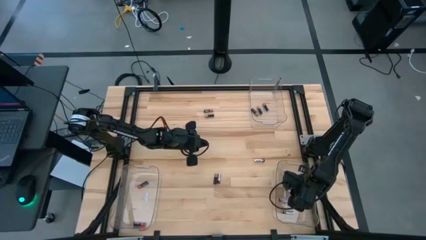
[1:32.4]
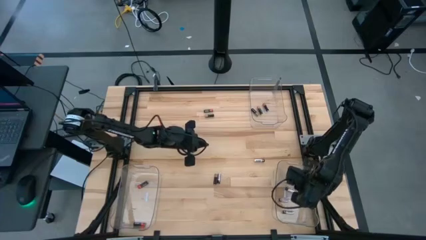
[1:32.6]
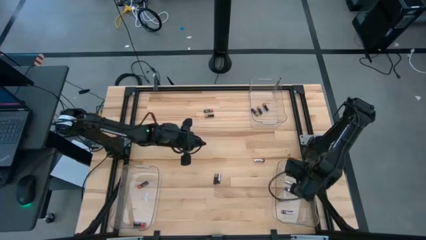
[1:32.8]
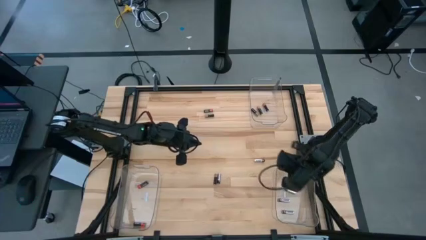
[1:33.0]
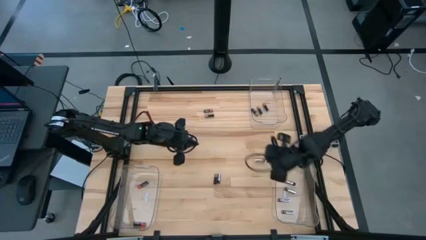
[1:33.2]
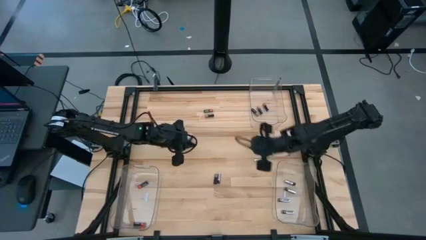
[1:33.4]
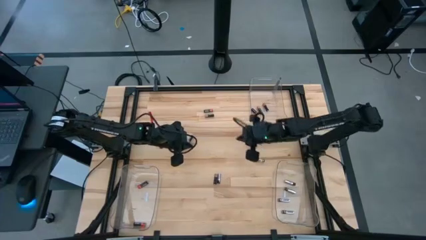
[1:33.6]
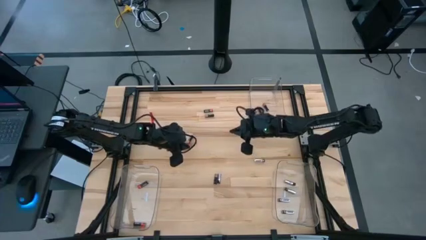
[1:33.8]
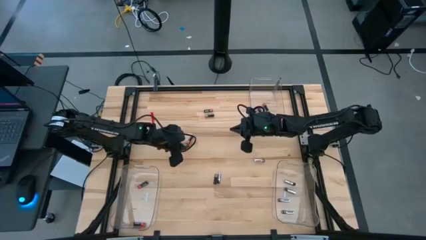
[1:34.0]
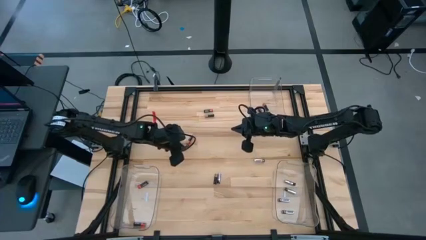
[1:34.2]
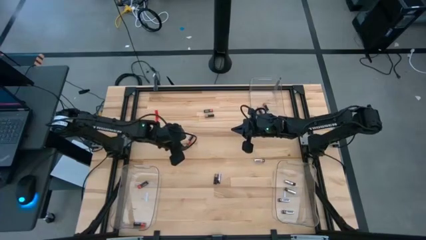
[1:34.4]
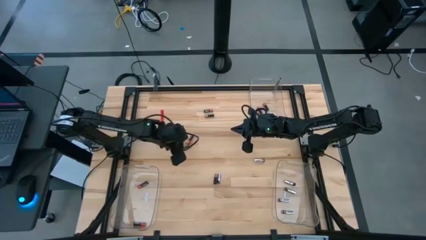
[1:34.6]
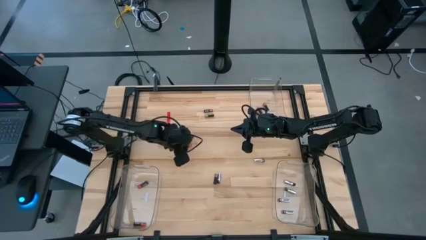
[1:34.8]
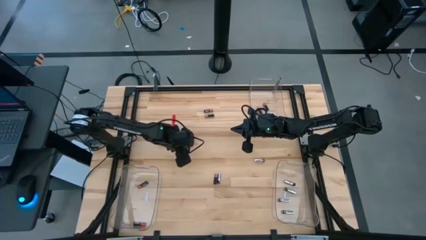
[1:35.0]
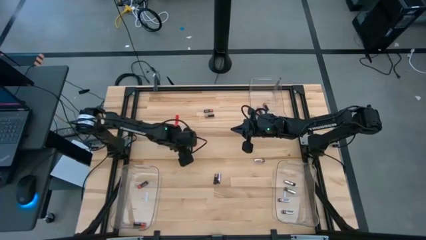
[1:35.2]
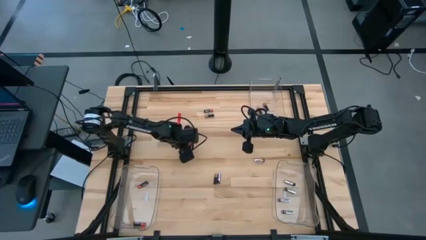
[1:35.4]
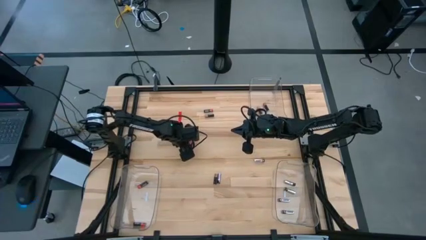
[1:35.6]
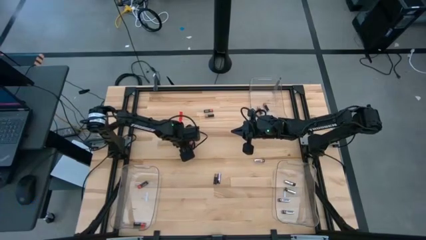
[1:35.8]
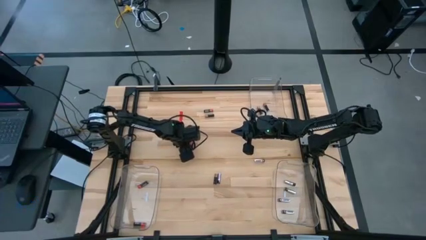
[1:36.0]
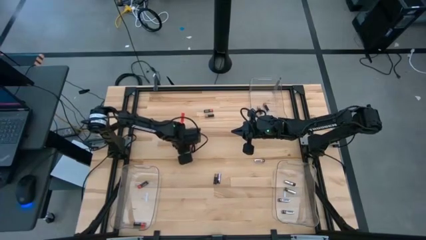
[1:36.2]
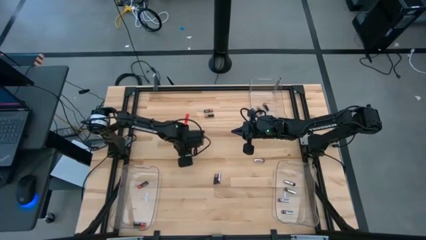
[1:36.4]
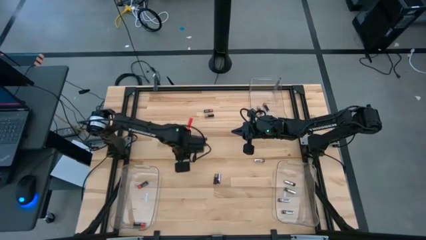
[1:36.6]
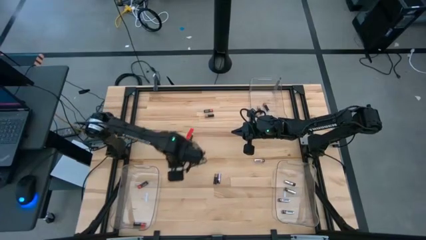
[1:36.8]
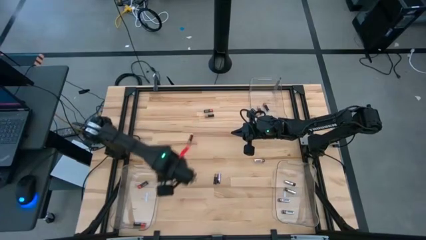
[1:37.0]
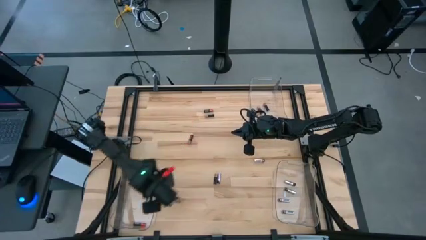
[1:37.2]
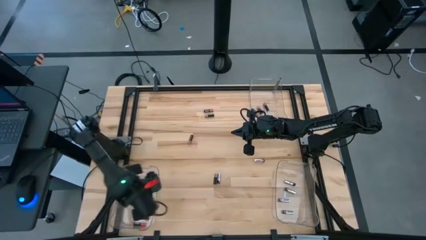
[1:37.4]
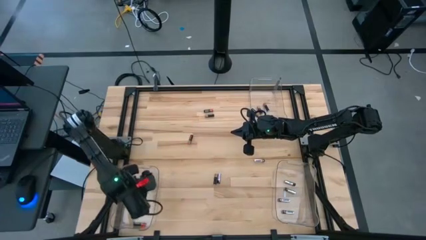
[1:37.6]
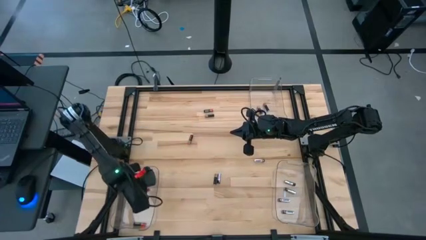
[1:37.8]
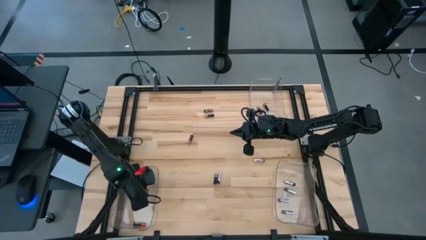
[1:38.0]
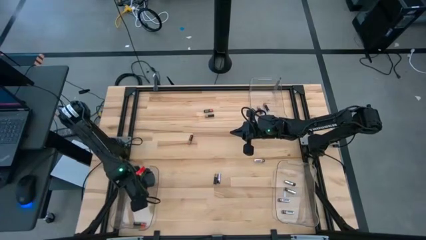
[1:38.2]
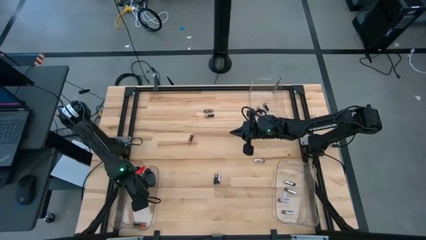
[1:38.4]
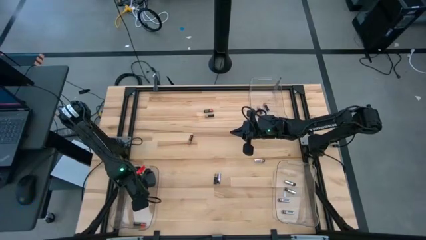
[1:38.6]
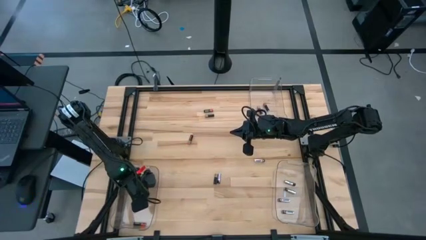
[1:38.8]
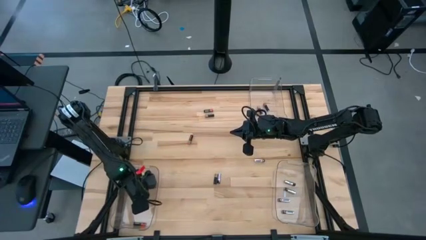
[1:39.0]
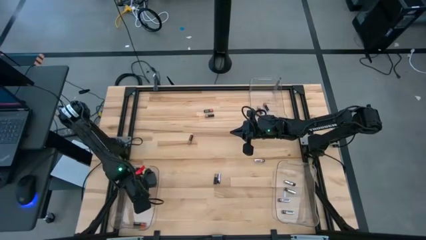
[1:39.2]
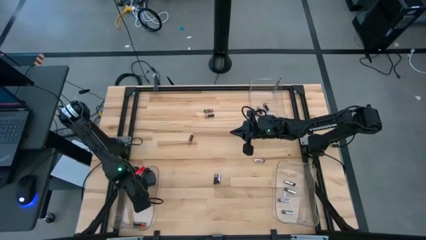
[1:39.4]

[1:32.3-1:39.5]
Task: Sort batteries
Put the orange battery into the bottom left transparent bin

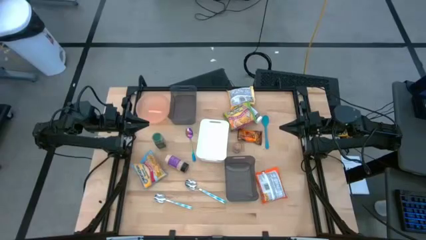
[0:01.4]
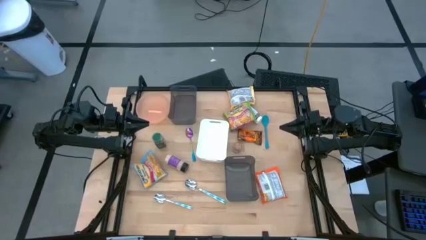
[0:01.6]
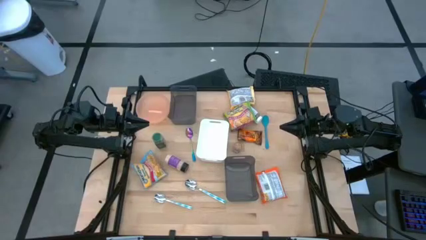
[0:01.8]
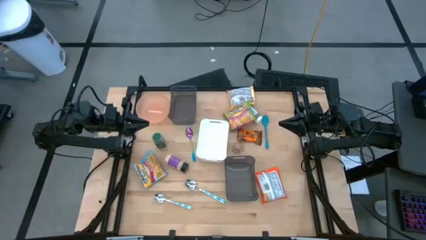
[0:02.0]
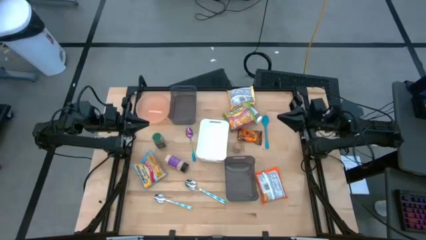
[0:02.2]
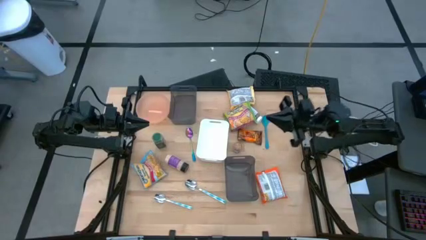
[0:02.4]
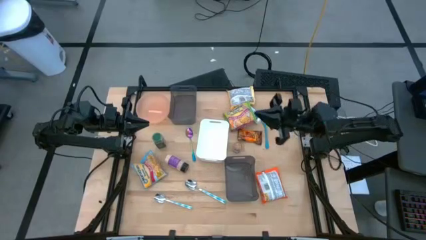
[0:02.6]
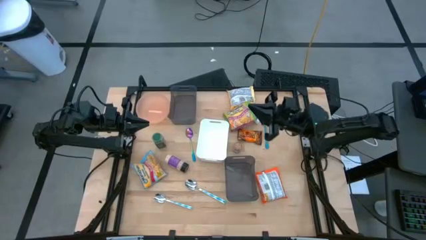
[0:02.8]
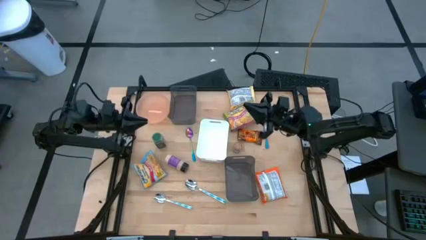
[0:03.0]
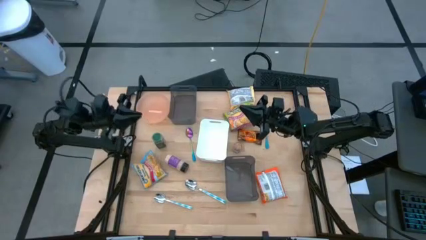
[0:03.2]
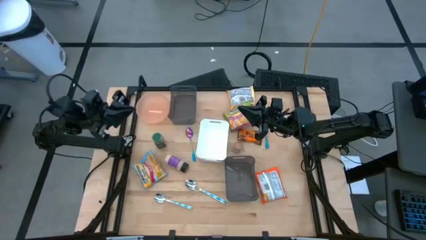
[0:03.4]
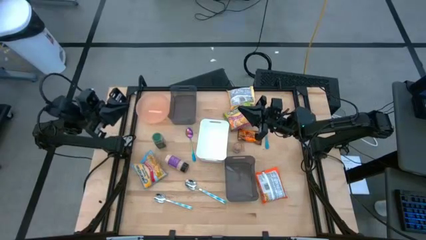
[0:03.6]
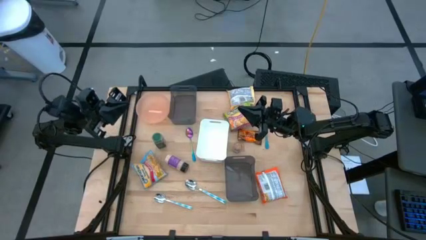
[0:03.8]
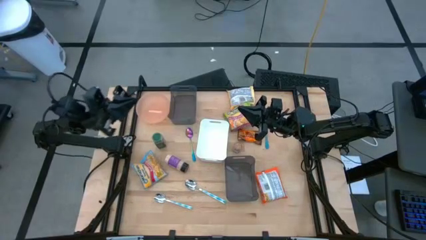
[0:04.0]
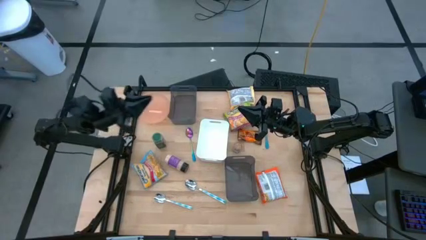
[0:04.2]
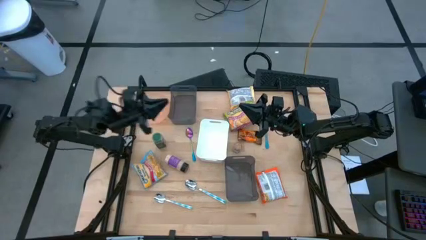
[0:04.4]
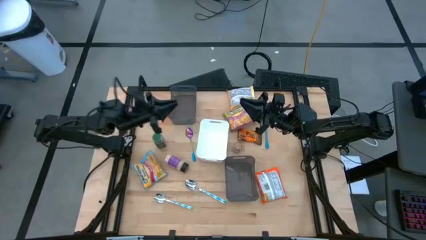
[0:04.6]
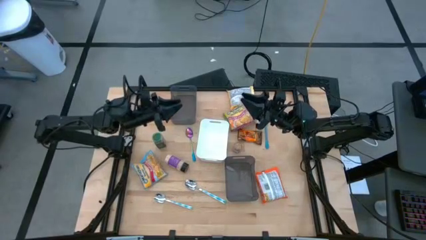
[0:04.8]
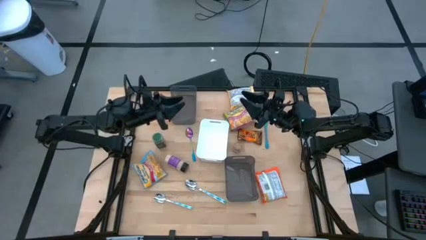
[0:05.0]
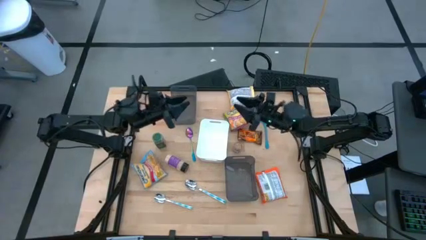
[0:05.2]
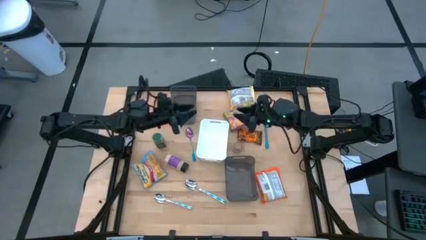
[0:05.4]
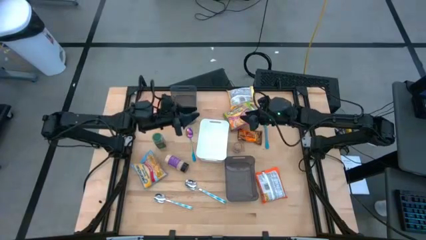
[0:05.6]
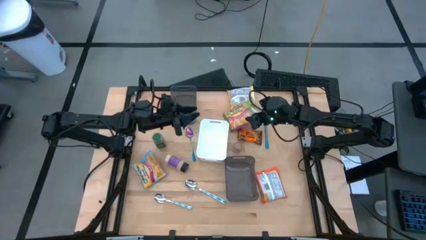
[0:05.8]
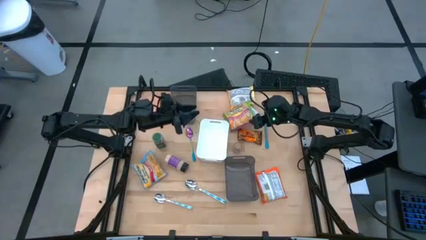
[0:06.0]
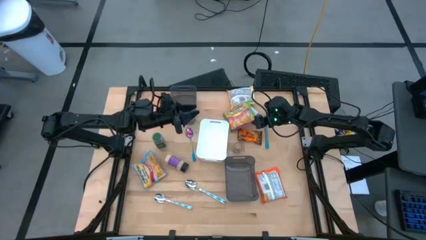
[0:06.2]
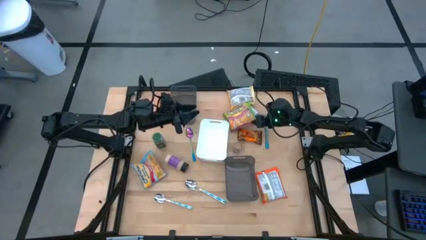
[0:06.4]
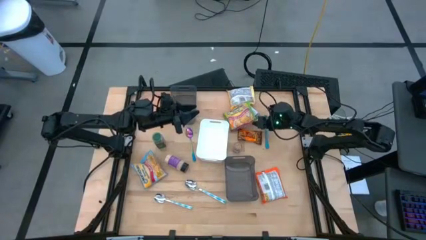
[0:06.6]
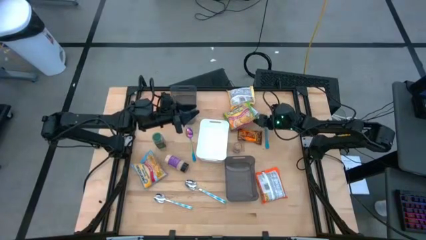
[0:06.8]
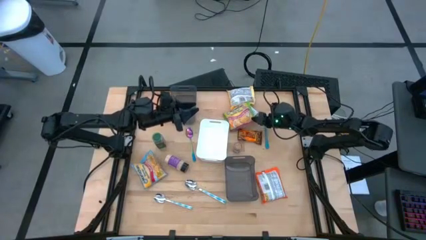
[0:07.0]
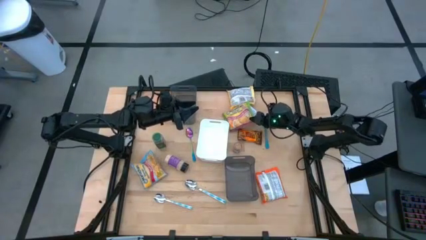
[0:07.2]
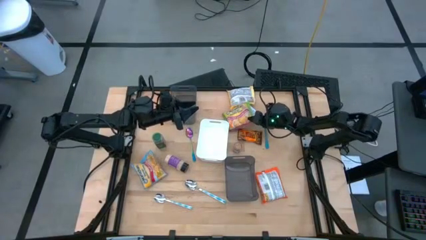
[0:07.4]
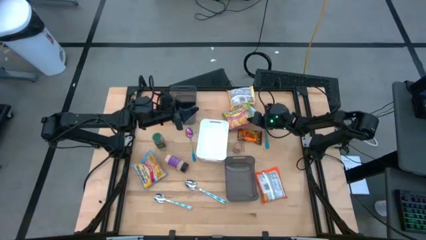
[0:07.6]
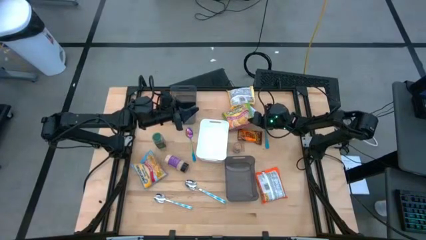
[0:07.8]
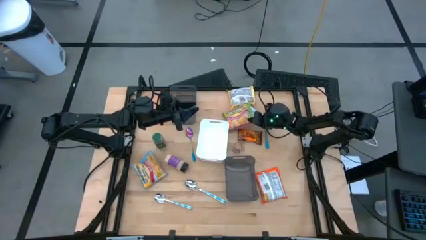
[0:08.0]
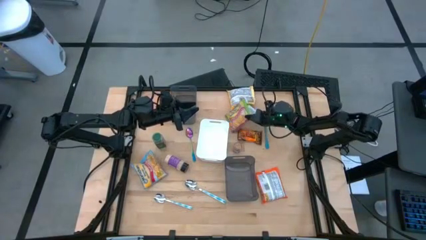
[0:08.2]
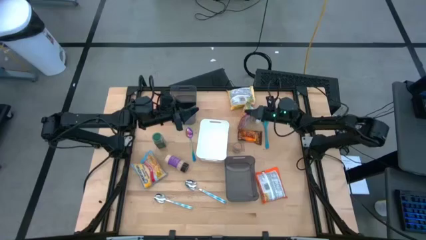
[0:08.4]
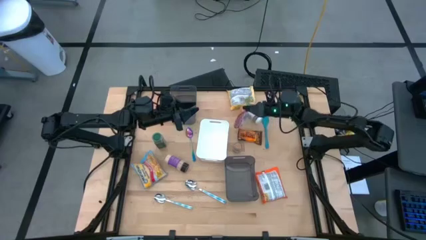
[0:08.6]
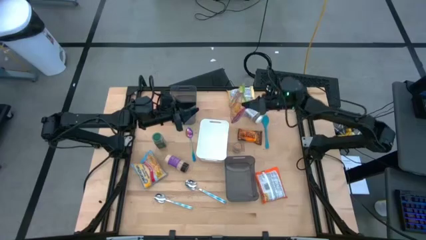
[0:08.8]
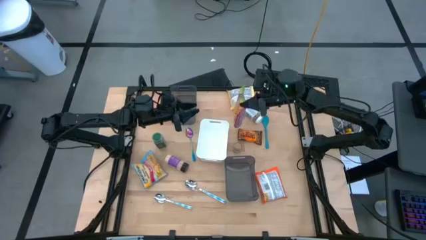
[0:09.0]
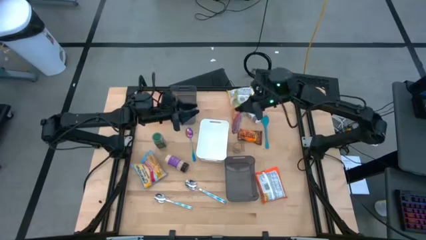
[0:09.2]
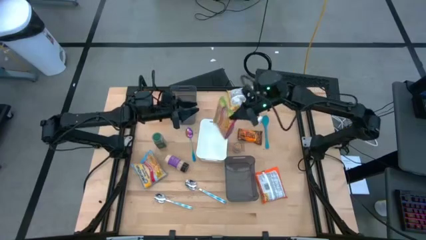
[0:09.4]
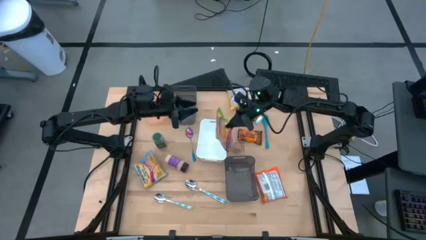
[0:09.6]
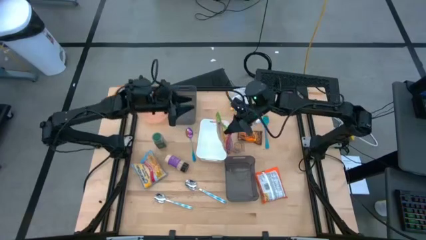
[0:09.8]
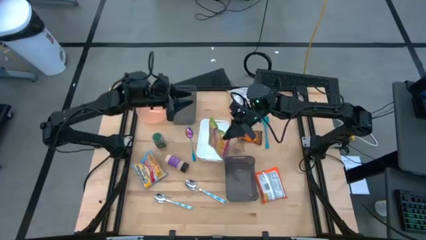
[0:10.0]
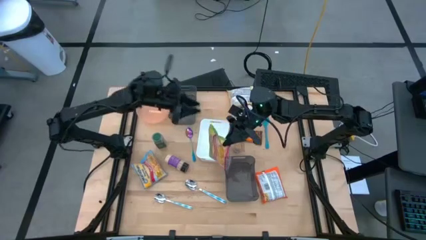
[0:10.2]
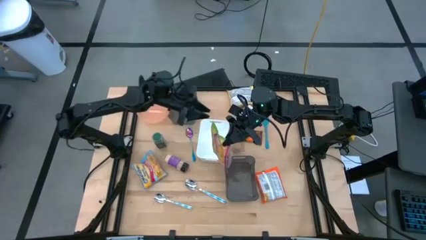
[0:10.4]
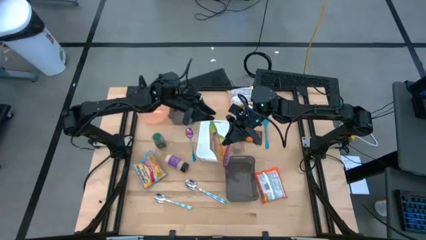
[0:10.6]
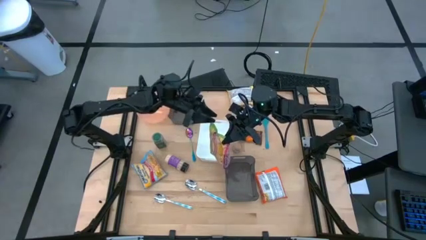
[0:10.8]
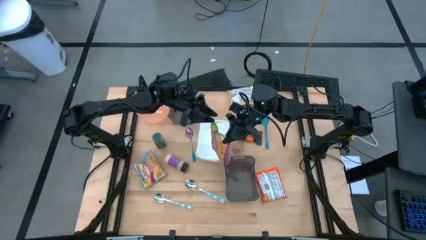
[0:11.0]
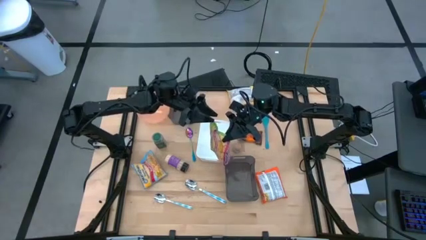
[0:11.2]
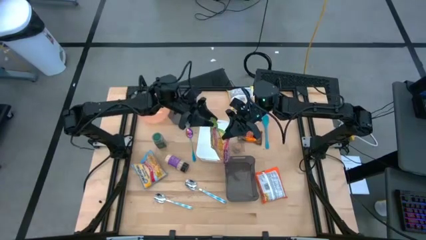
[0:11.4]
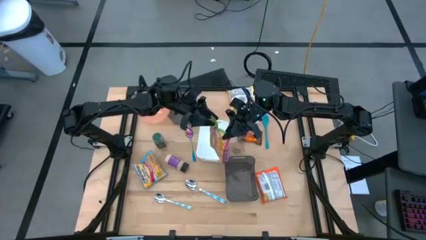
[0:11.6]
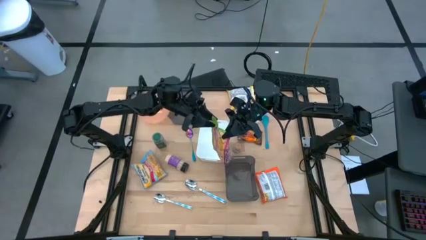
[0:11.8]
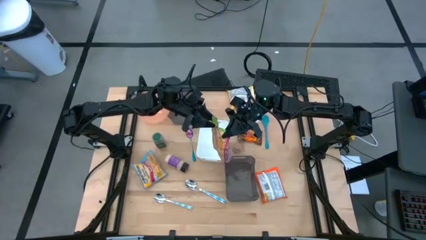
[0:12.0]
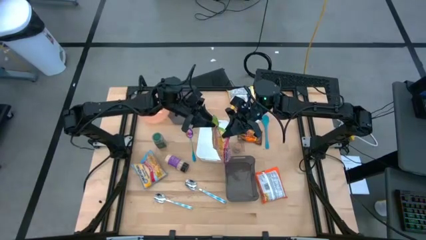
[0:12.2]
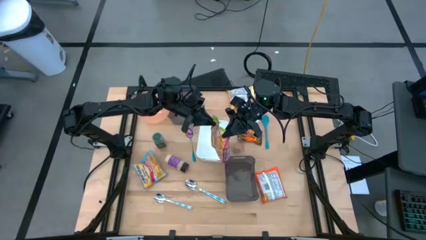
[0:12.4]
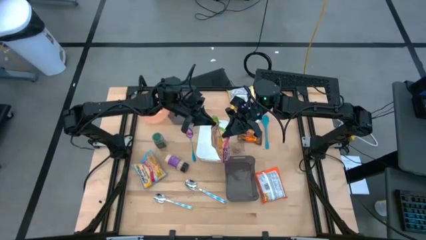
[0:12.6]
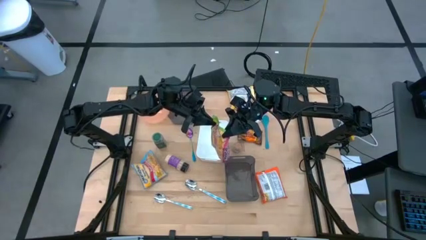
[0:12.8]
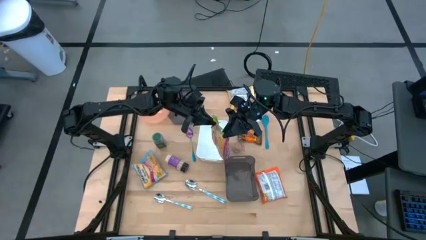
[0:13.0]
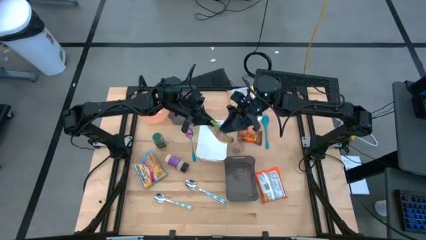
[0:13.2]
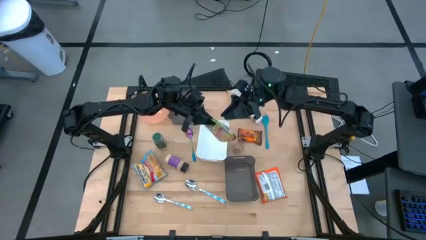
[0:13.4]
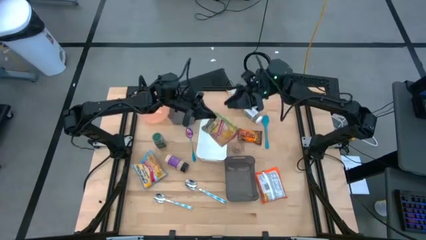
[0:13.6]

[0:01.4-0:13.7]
Task: Pick & Place Food Item
Put the green noodle pack into the top black bin
